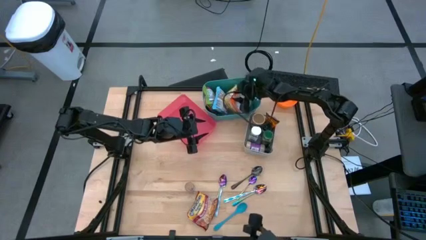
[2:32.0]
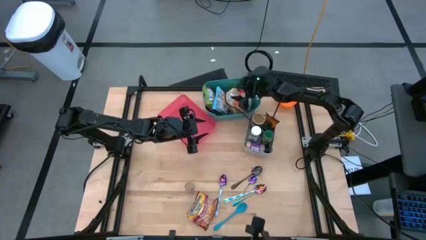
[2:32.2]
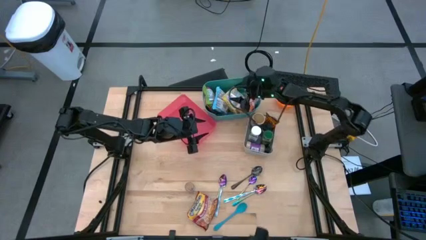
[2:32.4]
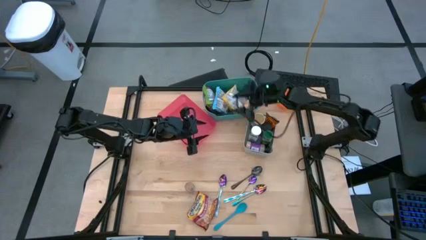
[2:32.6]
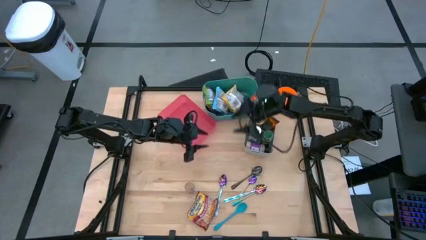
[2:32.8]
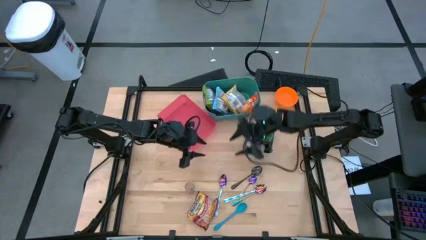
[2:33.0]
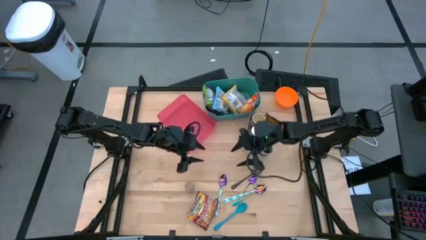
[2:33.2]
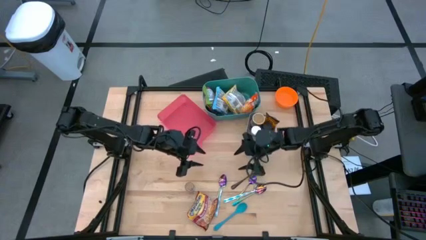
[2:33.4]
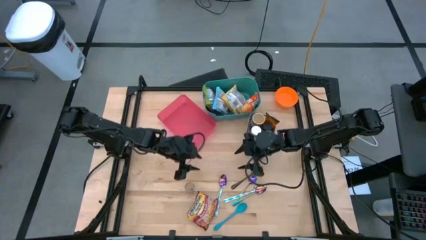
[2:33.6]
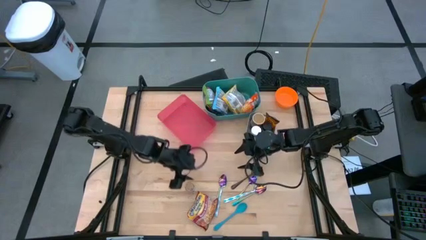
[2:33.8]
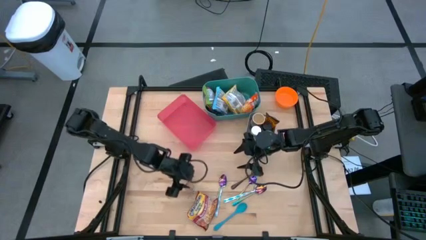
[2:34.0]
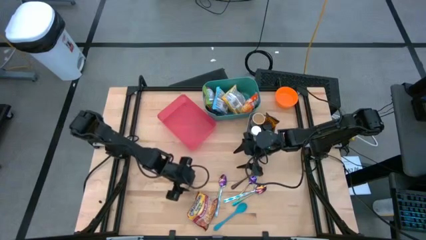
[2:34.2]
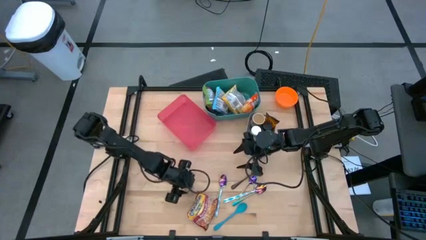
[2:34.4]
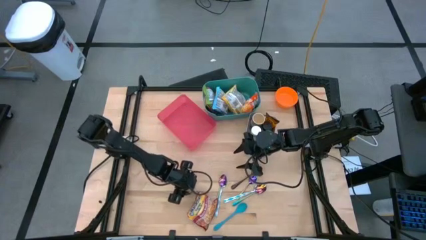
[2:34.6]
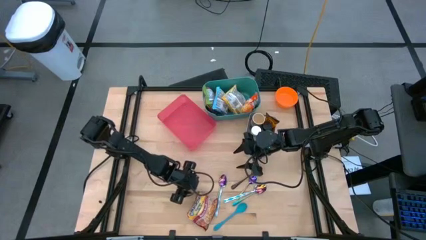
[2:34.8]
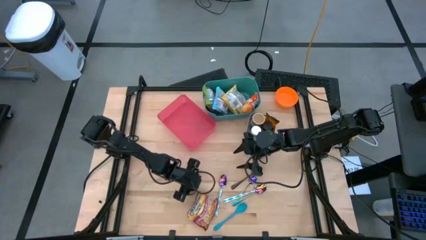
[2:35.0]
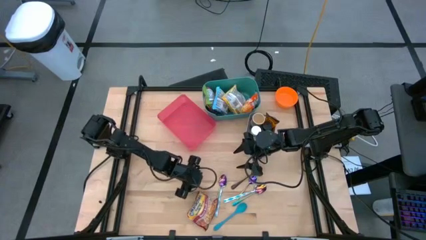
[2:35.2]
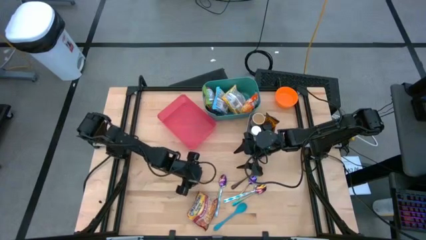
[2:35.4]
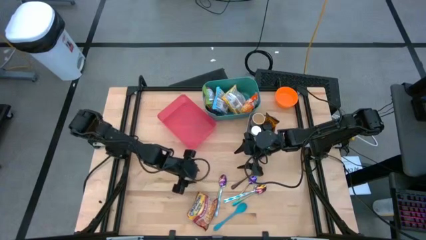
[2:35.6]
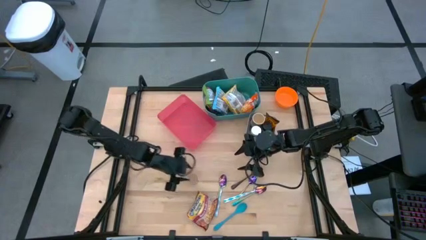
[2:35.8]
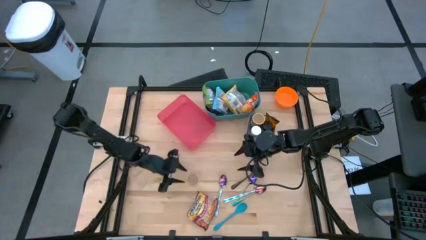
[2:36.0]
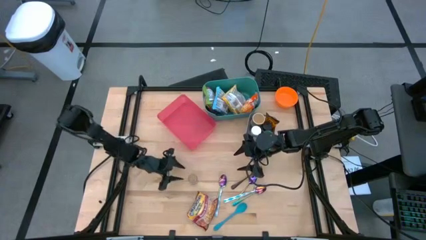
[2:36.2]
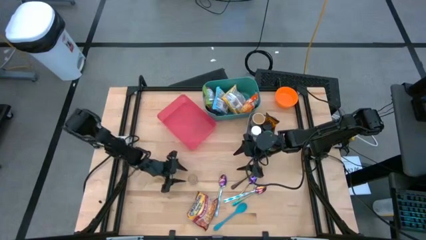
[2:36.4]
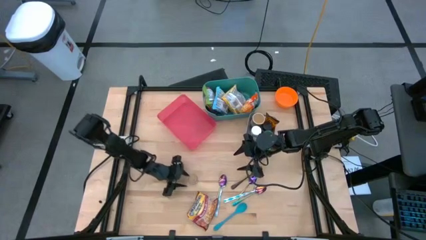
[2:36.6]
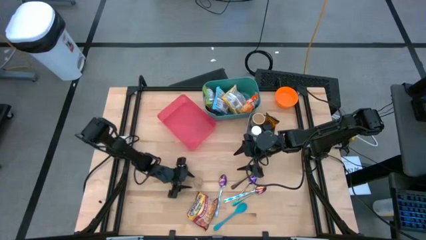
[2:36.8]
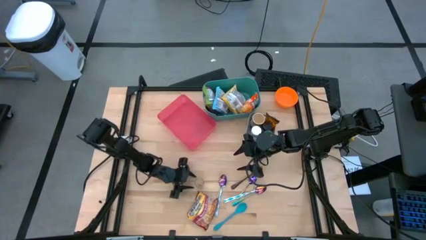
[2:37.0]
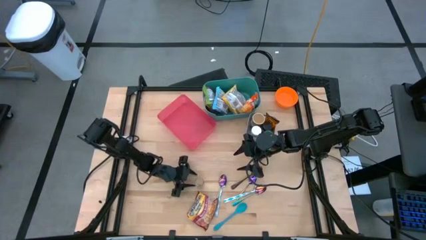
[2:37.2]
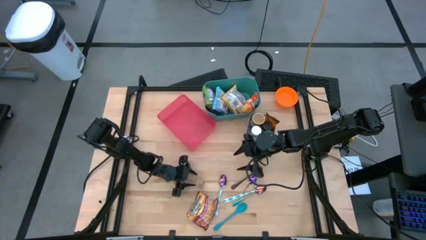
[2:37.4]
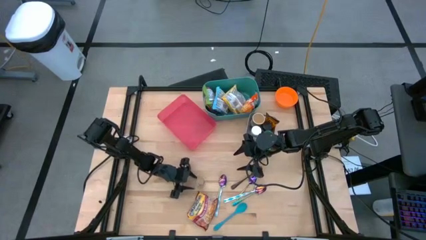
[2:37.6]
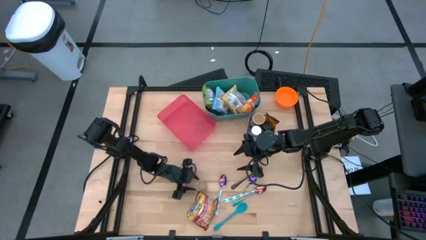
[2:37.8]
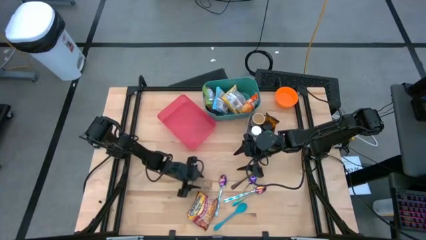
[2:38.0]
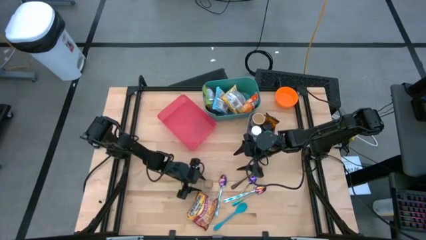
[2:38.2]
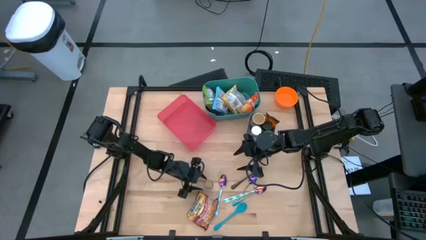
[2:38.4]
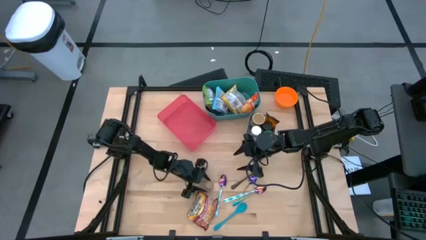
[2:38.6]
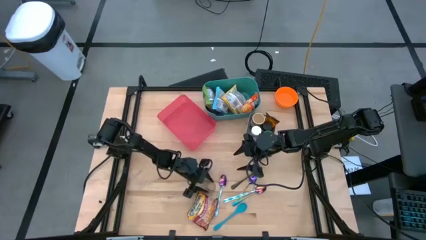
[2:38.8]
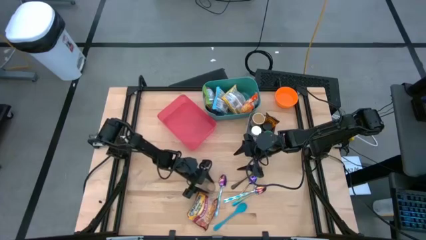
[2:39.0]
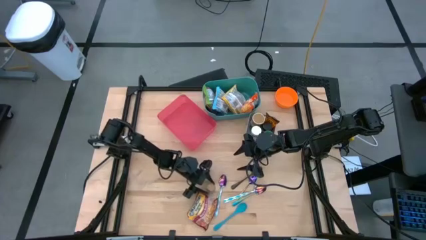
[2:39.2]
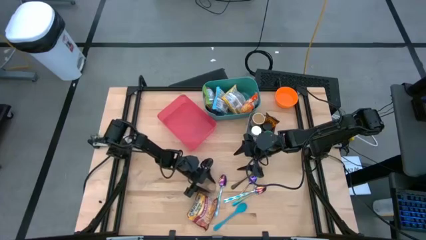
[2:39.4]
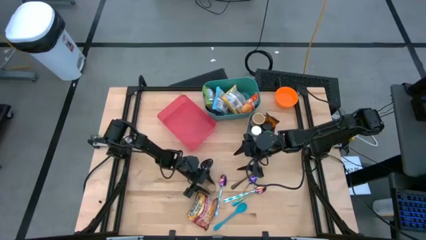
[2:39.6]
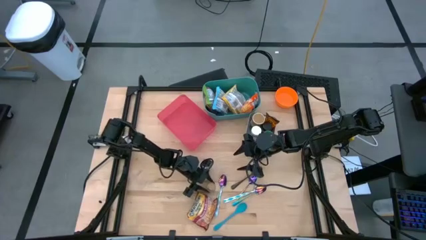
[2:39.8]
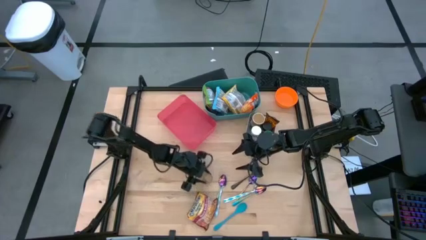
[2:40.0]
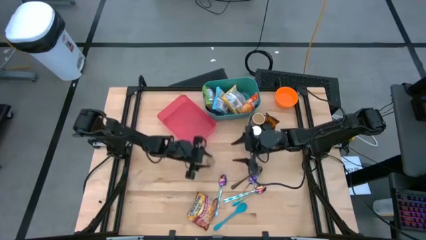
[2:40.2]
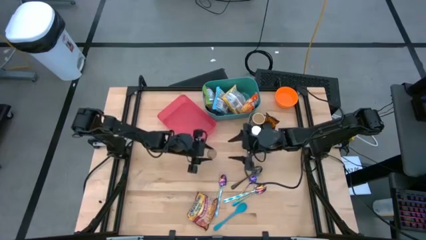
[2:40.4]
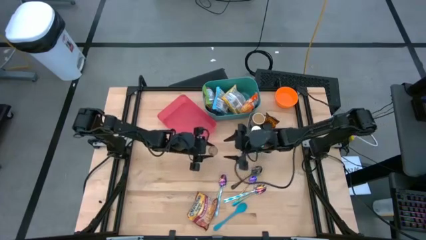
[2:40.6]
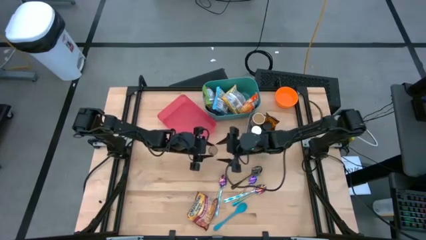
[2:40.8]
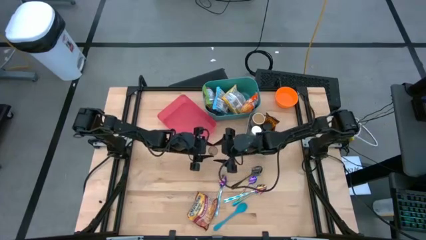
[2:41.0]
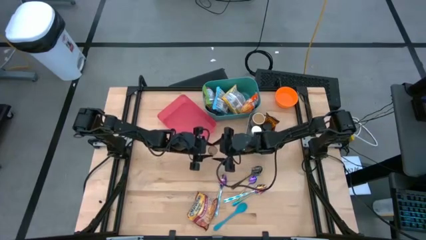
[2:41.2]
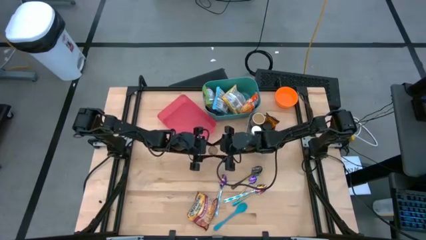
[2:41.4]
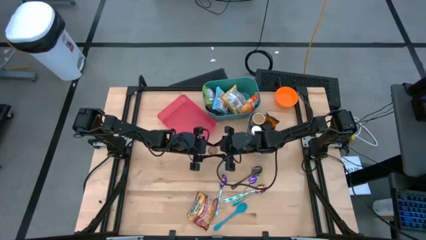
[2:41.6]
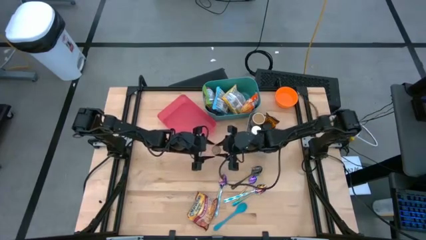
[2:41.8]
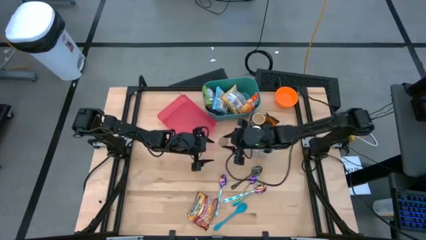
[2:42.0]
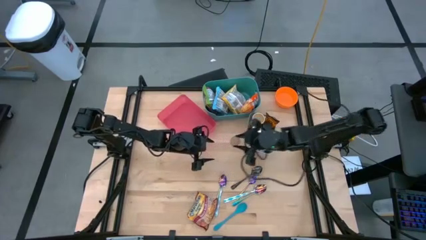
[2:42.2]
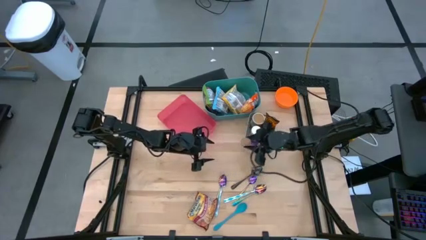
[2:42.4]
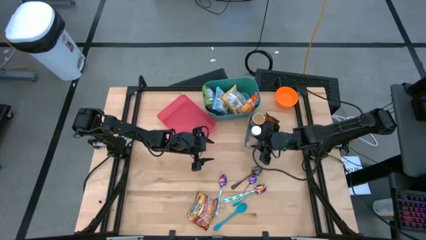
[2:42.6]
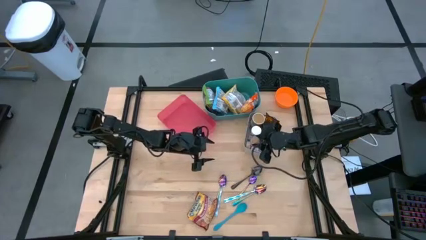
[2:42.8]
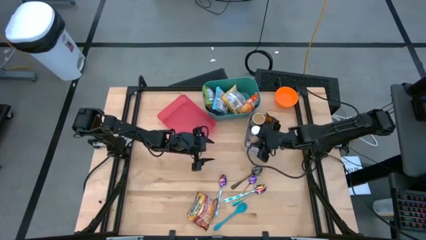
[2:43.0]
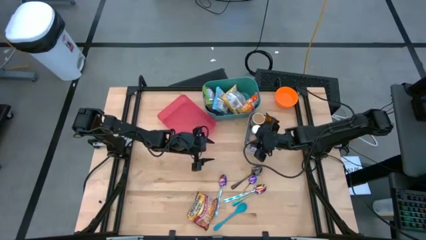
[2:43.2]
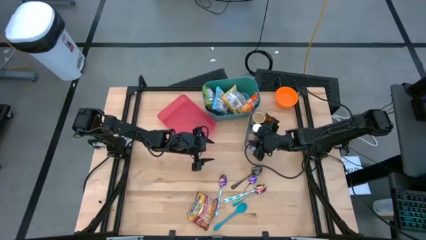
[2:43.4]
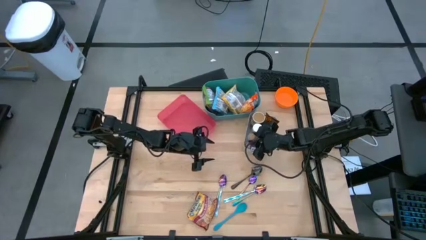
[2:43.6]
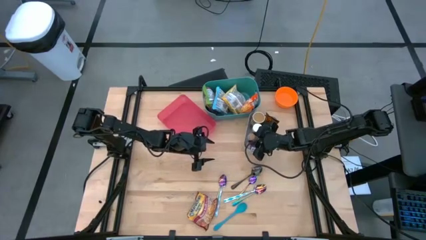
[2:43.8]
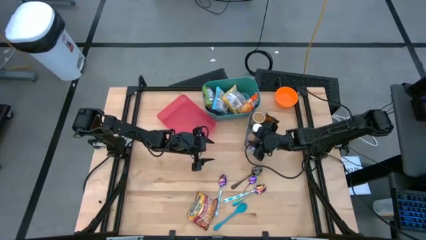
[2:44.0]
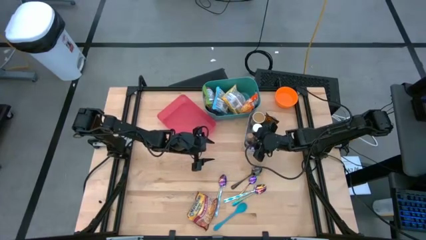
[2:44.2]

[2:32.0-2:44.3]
Task: Pick & Place Food Item
Put the brown spice bottle into the gray bin

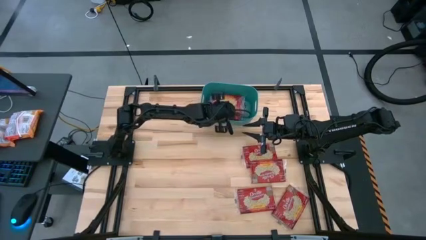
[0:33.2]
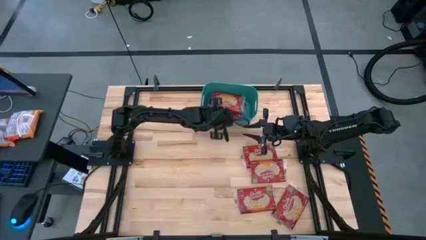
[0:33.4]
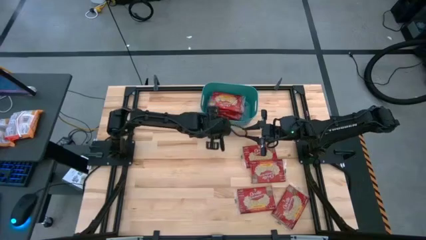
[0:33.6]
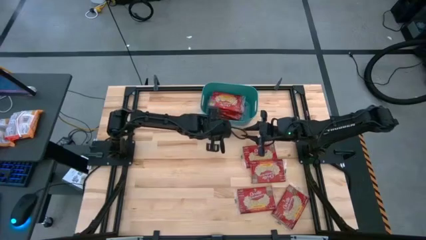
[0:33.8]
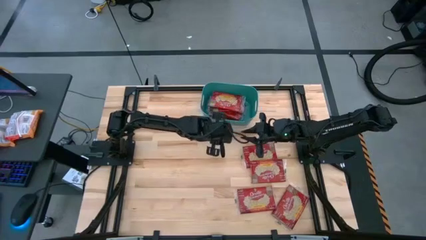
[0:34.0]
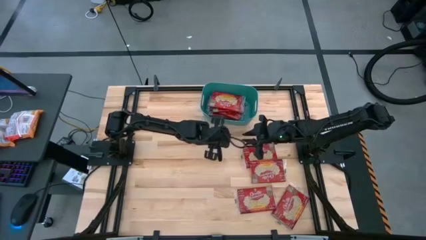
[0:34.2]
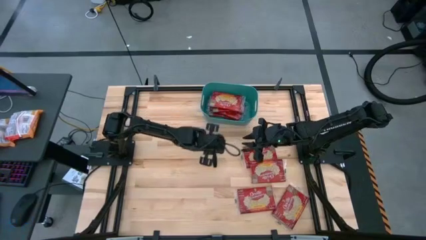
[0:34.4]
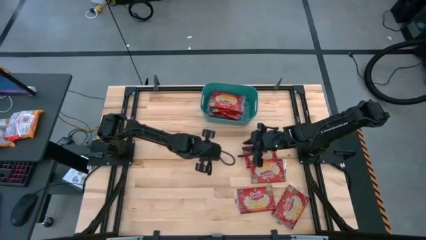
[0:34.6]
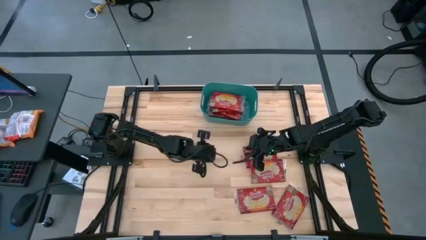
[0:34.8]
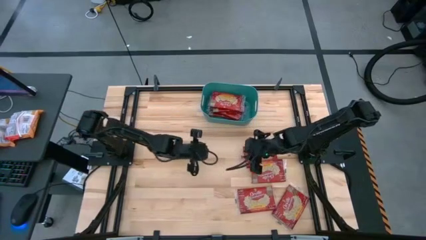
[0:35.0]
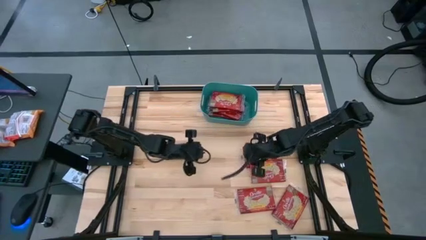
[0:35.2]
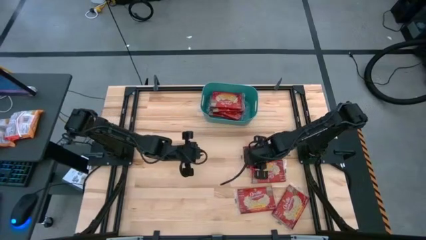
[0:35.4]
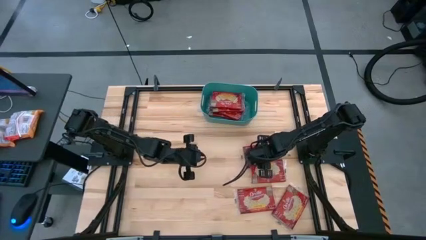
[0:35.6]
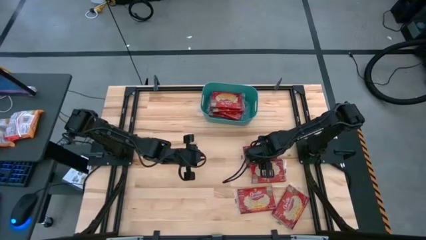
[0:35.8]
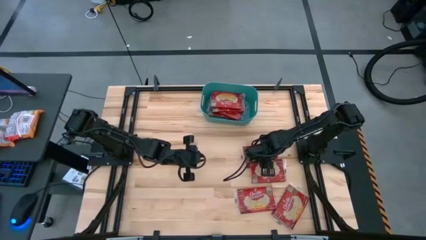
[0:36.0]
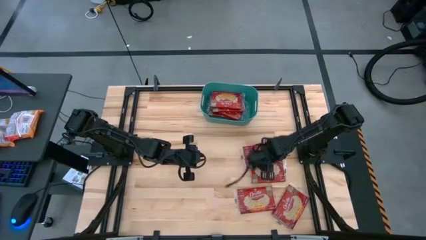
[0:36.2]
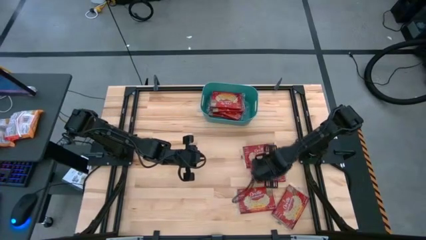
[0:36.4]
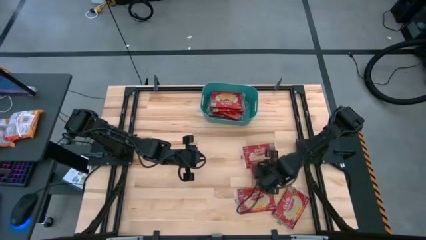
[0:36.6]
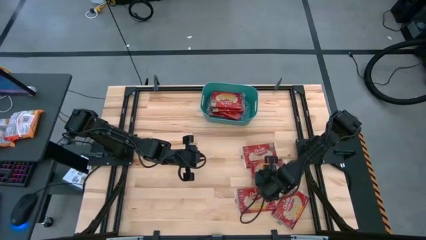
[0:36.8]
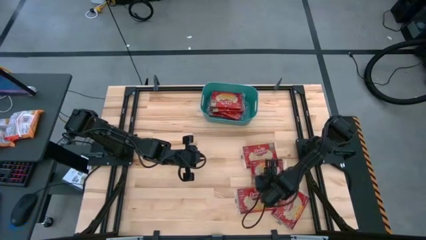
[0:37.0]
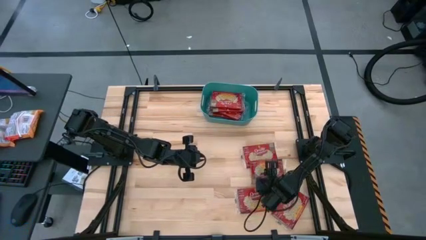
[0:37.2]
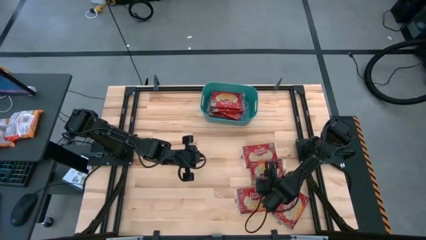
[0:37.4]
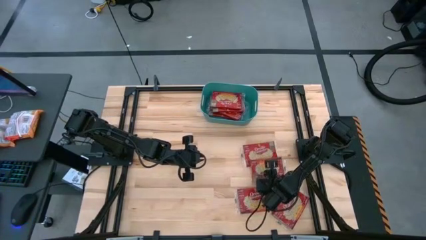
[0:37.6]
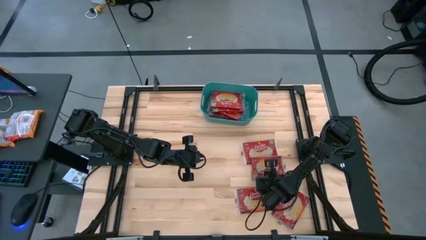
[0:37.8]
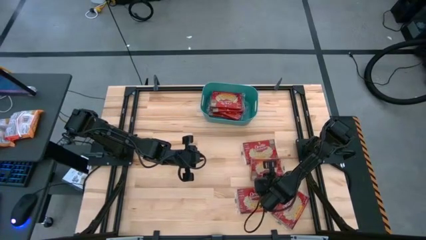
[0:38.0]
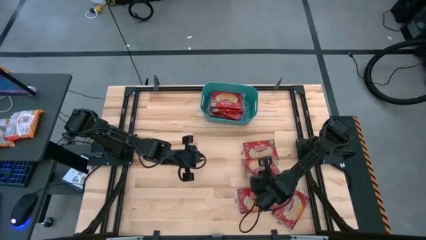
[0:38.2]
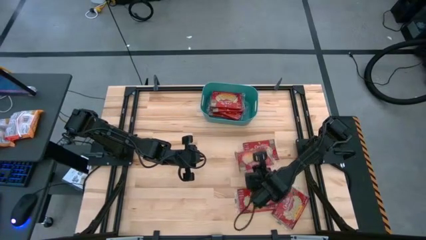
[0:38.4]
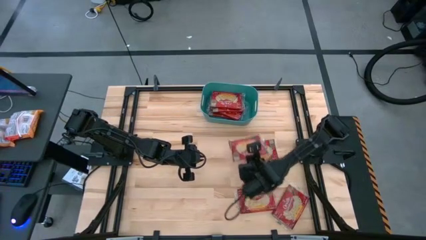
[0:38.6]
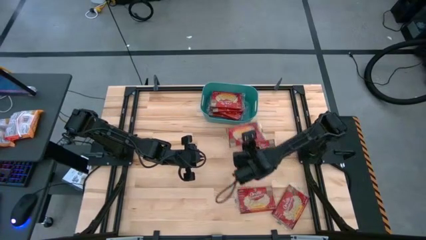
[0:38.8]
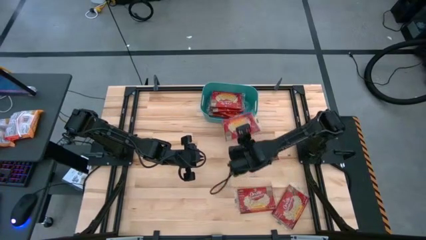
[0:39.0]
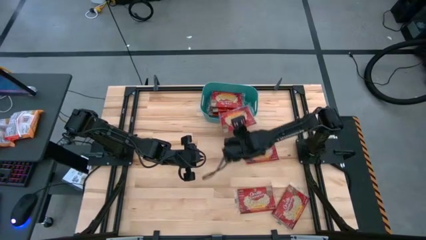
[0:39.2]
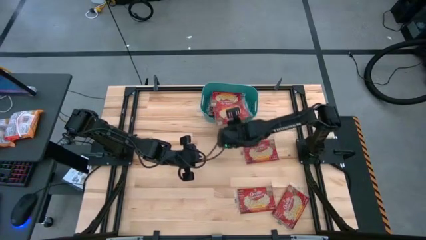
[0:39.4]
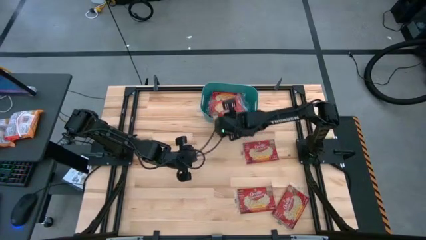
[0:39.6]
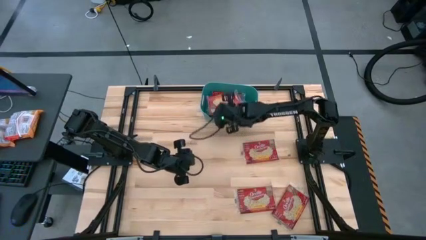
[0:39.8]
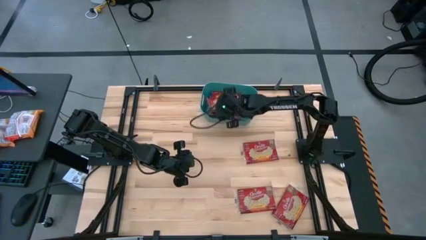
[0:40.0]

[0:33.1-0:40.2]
Task: Sort popcorn bags into baskets
Put the red popcorn bag into the blue bin
